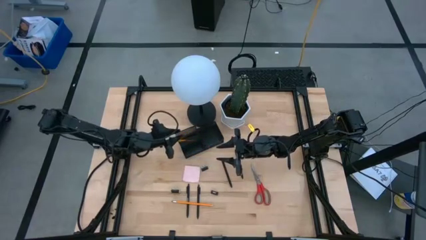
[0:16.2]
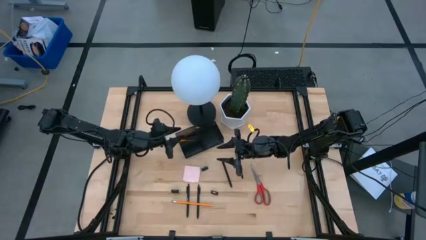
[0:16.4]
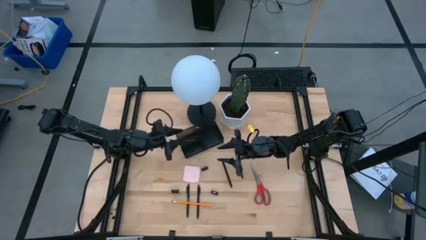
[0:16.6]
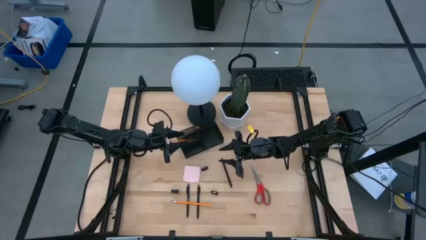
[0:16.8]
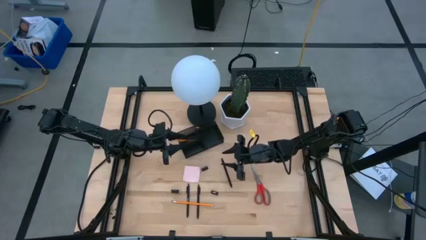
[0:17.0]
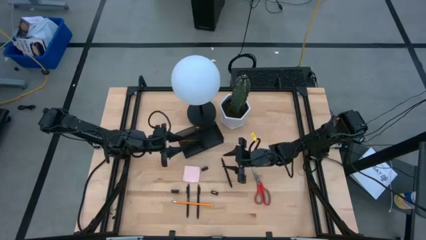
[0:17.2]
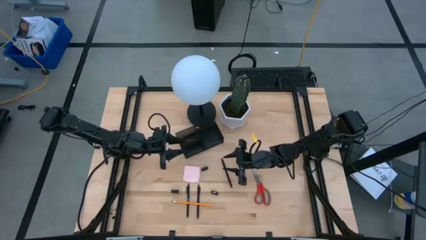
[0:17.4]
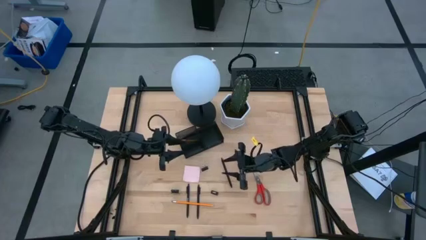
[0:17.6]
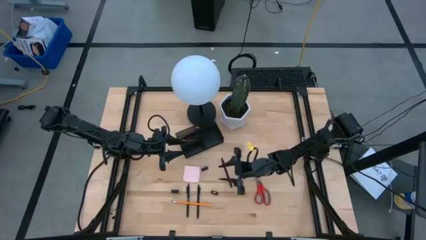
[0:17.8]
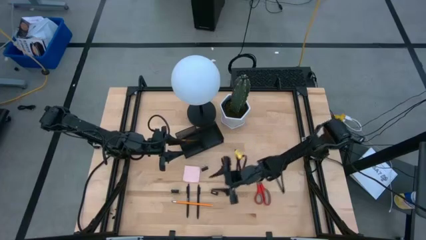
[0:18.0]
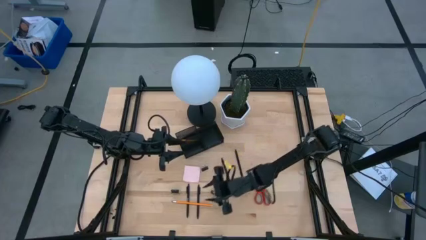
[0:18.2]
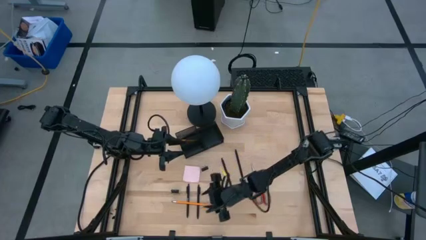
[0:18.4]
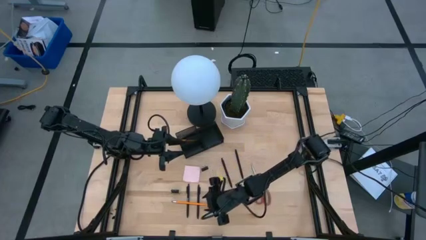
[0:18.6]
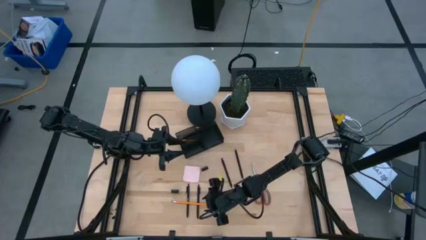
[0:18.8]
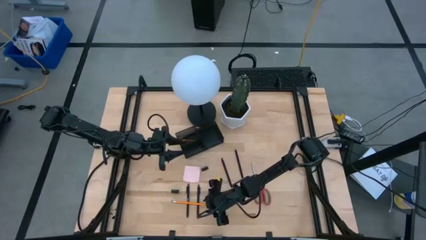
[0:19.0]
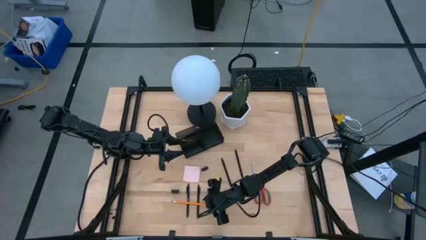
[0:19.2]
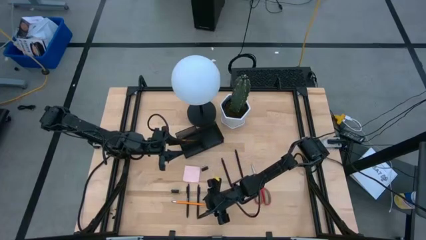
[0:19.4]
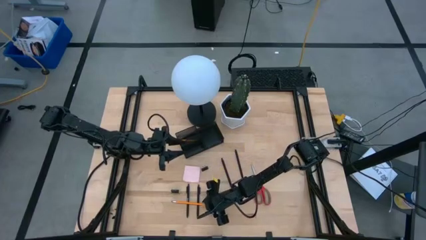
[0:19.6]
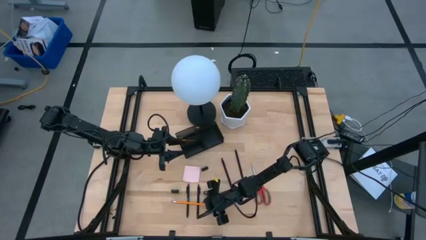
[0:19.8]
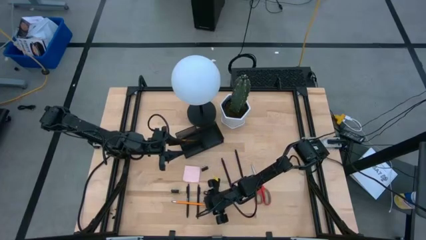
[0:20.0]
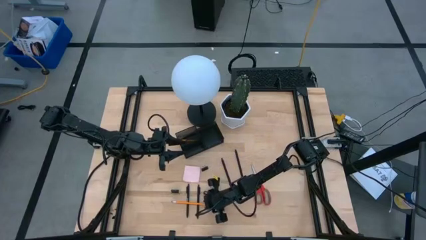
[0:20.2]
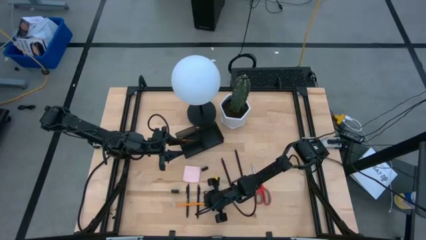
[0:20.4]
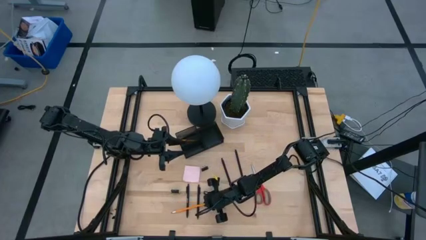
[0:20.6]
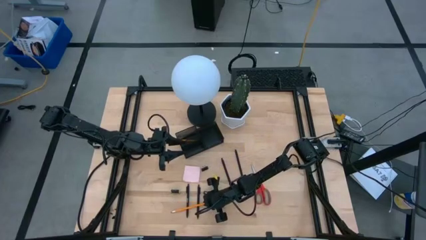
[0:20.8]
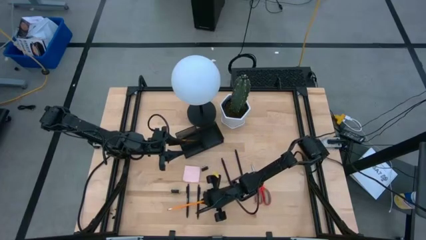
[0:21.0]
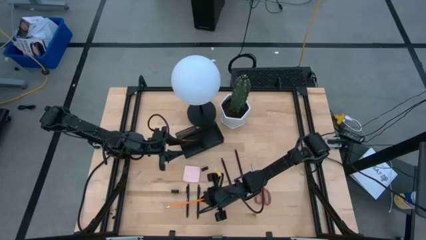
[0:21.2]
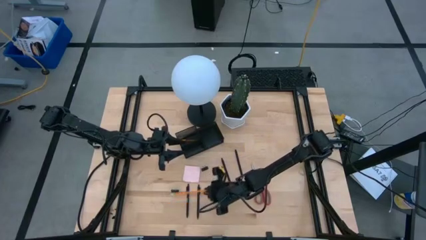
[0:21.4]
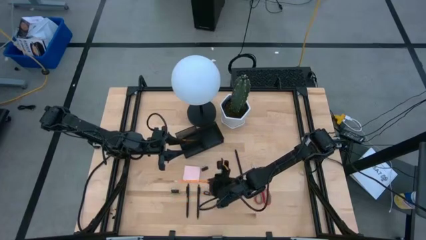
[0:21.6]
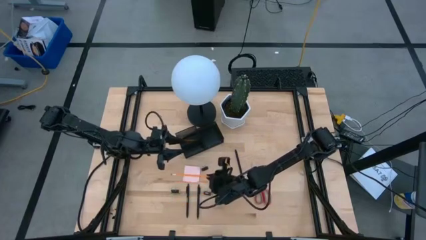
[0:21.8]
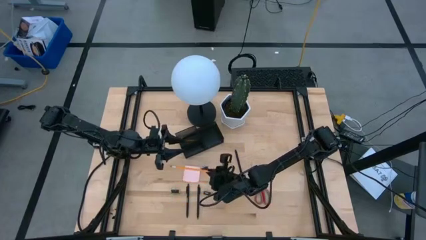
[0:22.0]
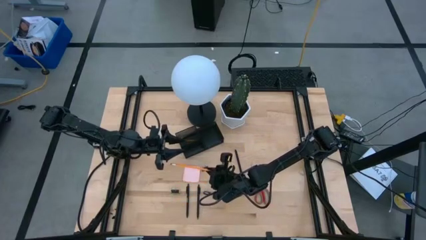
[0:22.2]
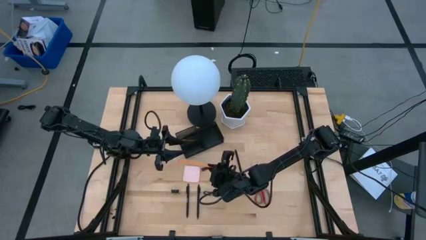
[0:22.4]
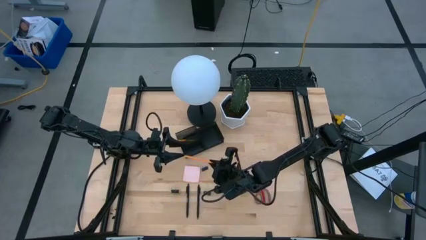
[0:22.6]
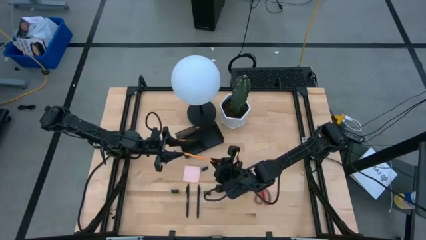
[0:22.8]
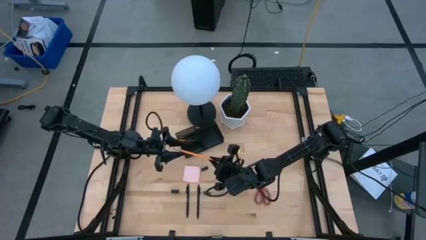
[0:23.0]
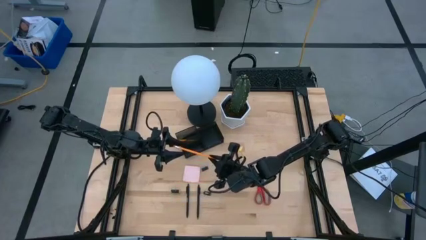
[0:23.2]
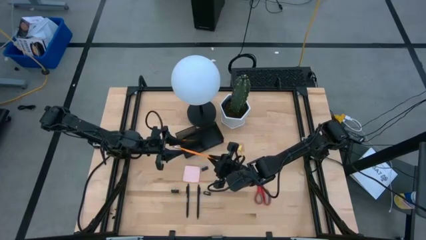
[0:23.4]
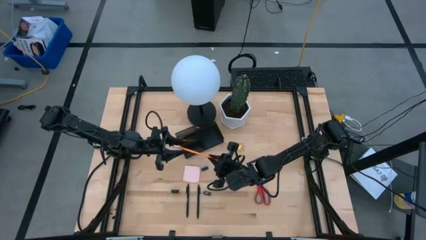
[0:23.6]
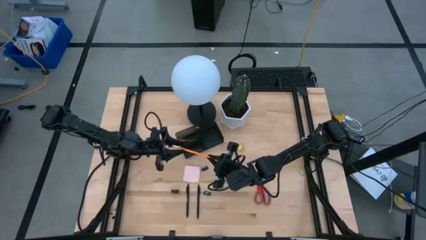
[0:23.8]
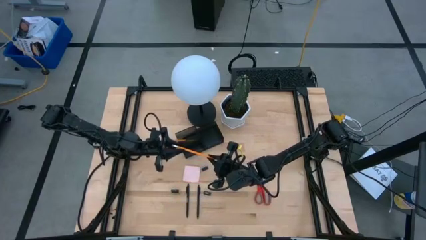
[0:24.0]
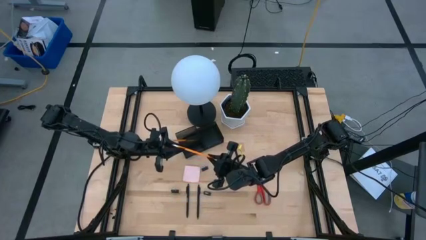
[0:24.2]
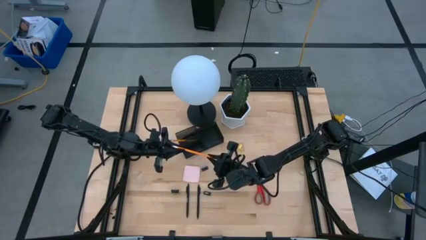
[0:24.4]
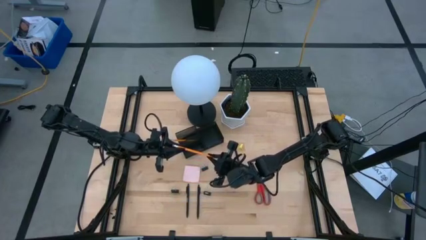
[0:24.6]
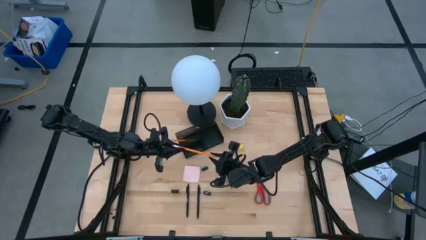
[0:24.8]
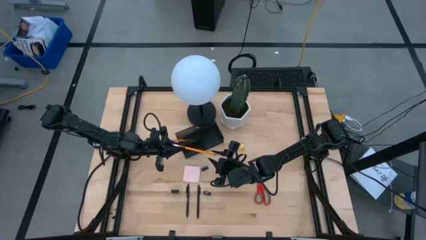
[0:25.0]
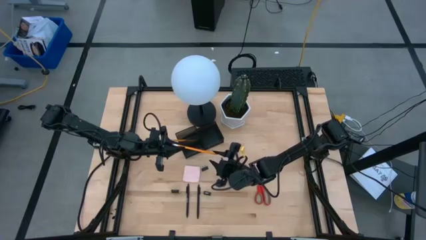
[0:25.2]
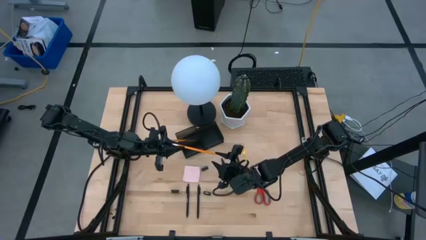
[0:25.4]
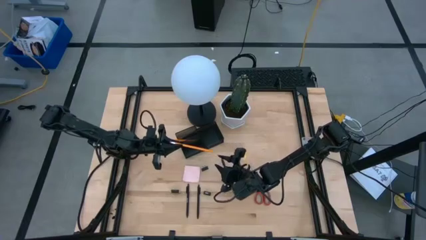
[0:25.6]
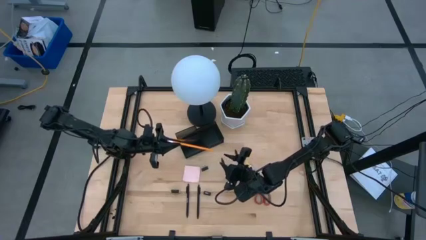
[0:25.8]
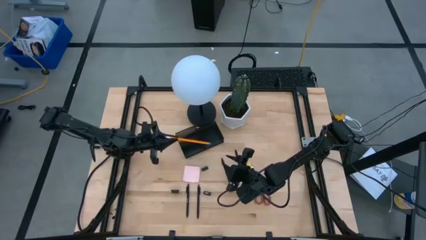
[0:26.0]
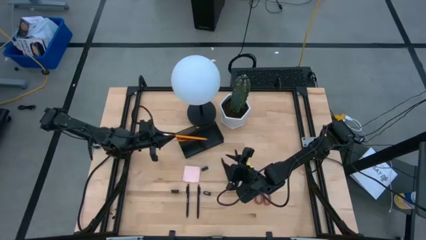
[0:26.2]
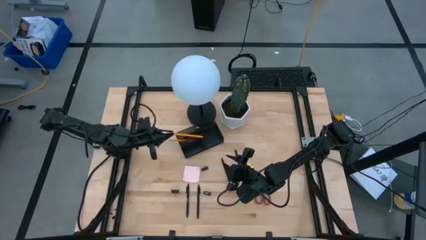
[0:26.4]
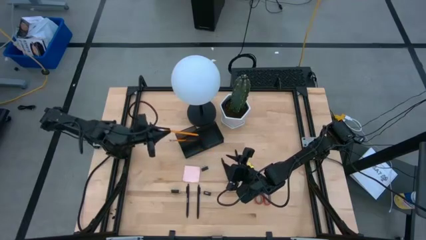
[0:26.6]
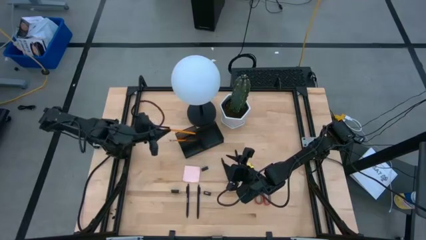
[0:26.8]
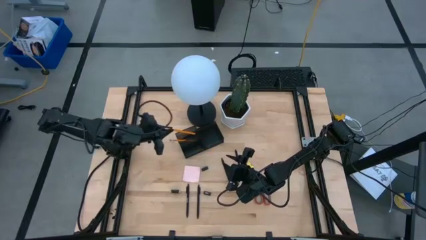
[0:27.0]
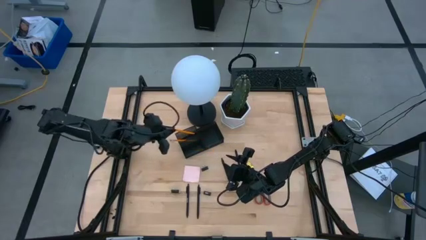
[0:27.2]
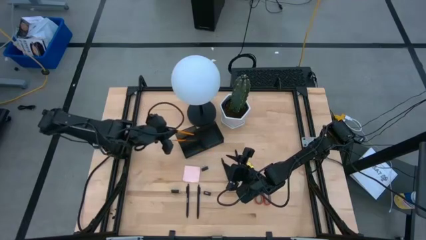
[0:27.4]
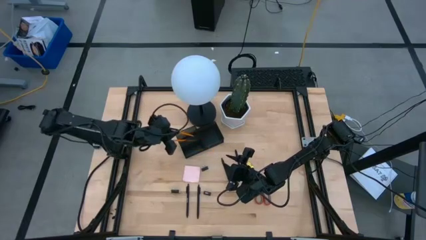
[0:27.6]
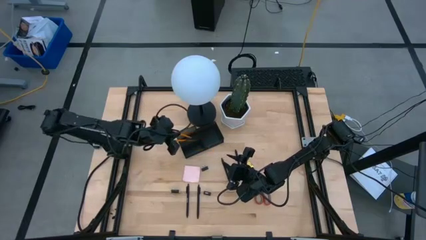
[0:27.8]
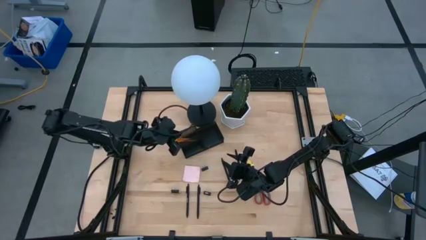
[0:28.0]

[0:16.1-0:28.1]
Task: Pick and place office supplies into organizer
Put the orange pencil into the desk organizer

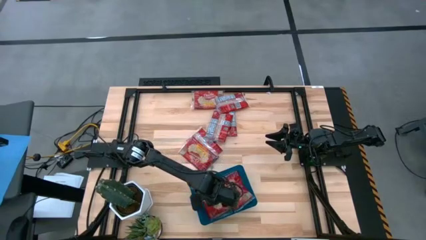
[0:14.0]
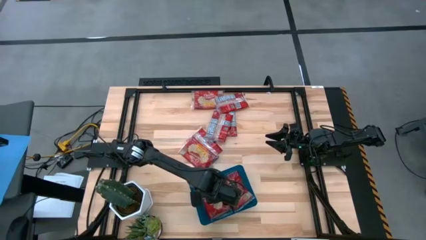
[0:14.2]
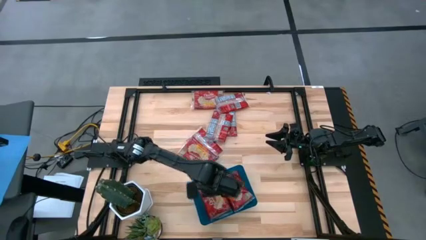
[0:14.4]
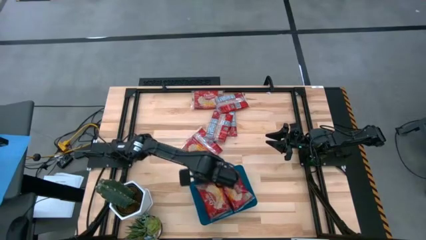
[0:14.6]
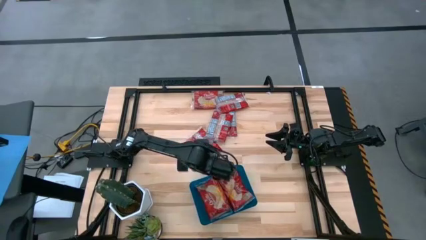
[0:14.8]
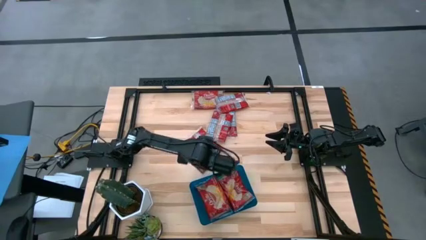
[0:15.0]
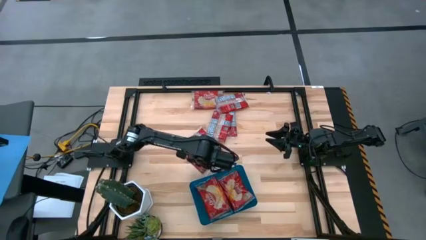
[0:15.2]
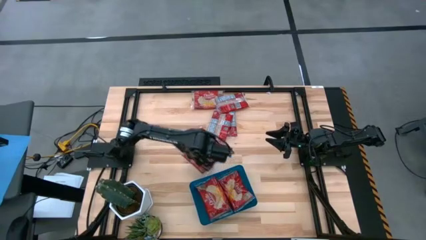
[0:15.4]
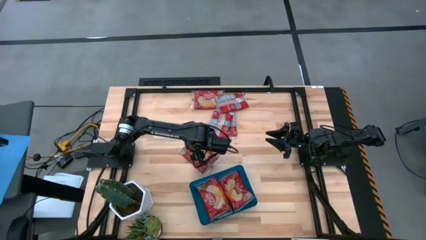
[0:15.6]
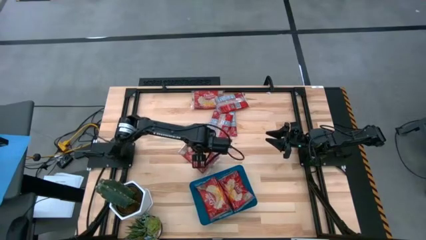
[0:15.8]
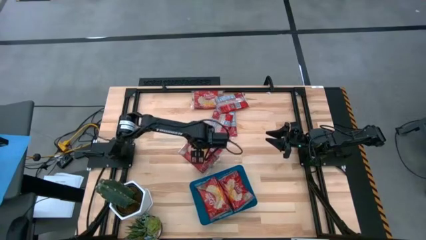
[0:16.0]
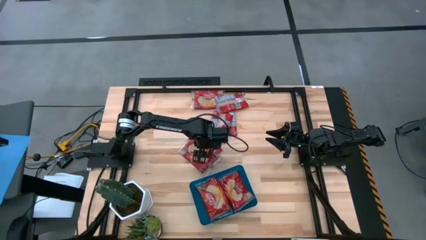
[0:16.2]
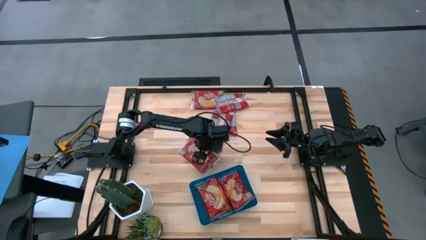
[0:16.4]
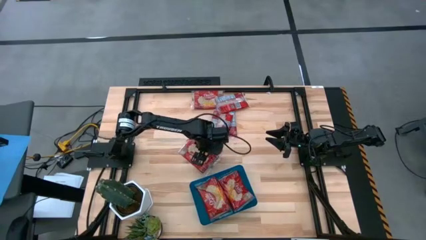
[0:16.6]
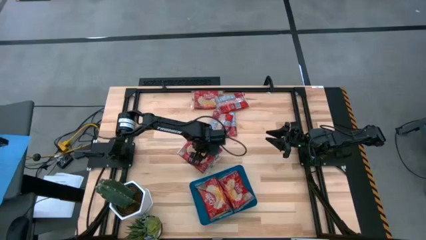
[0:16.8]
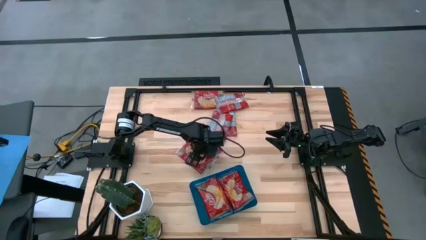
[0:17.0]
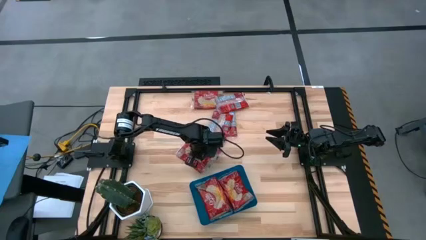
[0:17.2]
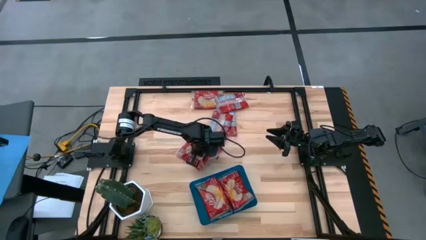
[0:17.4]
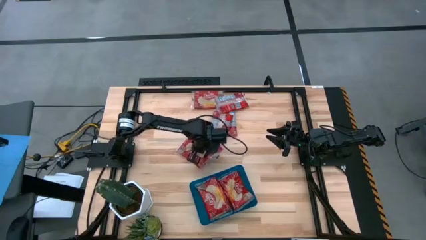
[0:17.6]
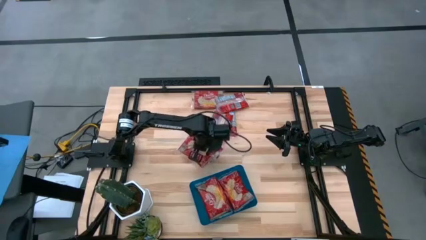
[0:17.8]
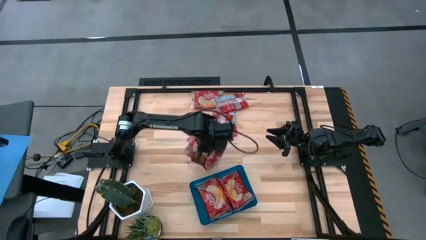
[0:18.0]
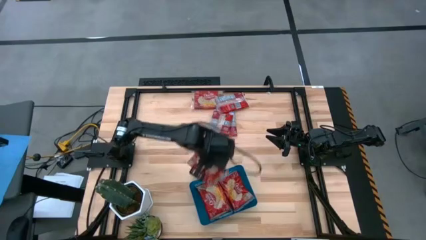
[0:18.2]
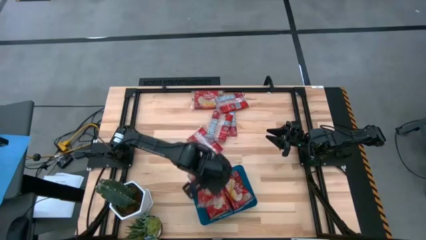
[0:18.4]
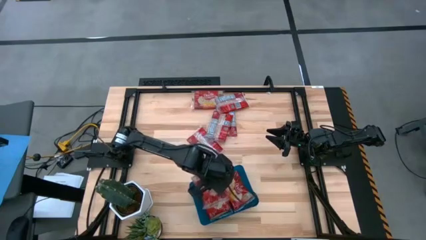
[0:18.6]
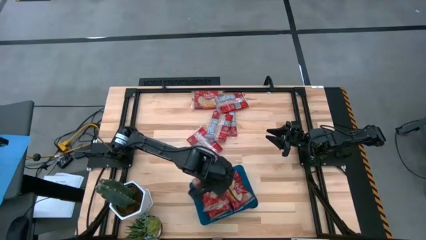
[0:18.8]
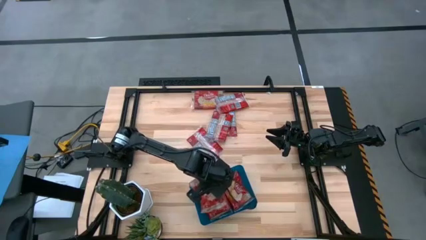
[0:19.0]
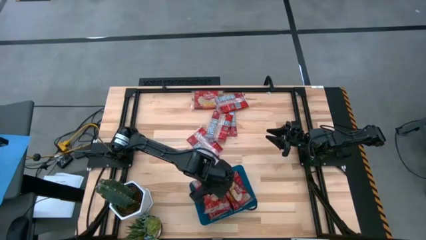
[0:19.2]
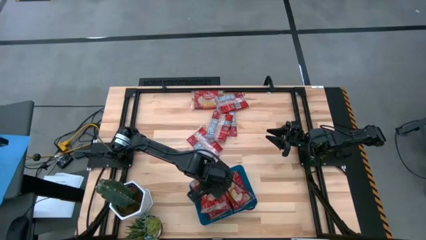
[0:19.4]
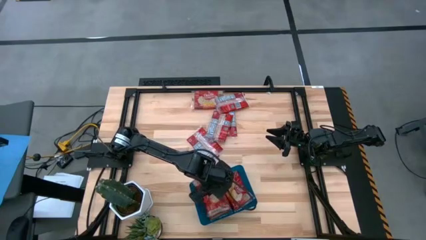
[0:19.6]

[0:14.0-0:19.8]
Task: Sort popcorn bags into baskets
Put the popcorn bag into the blue bin
